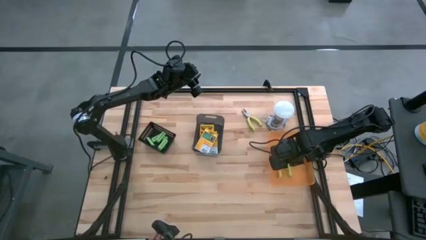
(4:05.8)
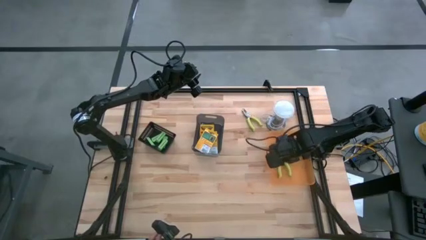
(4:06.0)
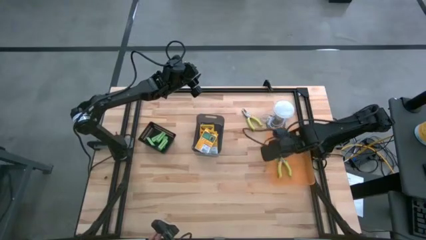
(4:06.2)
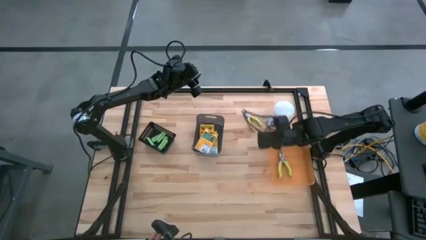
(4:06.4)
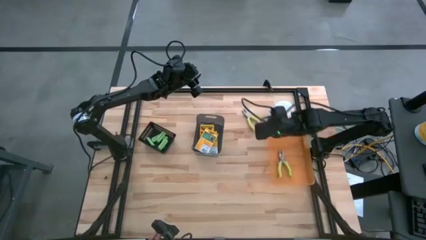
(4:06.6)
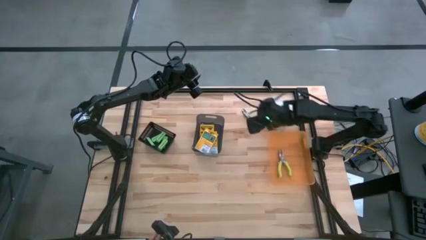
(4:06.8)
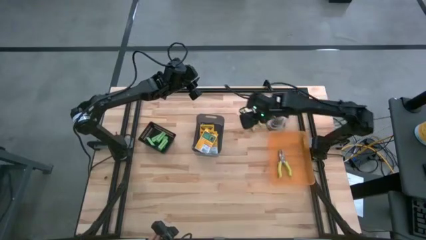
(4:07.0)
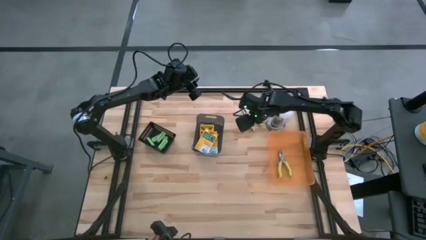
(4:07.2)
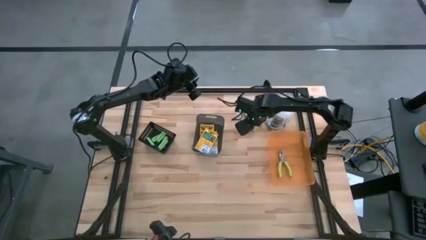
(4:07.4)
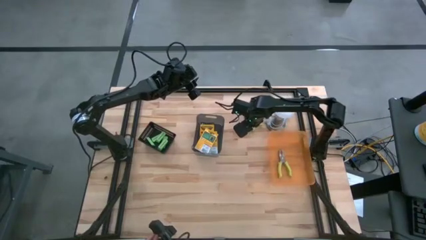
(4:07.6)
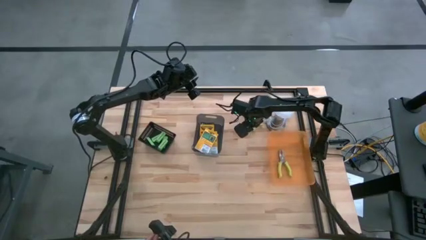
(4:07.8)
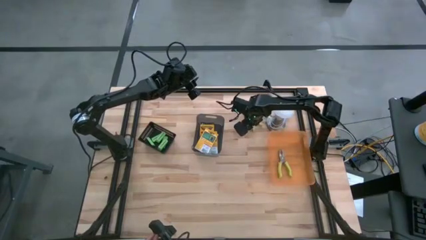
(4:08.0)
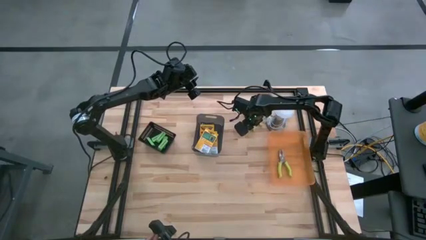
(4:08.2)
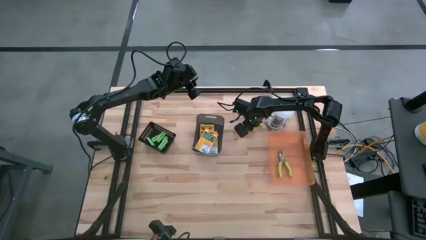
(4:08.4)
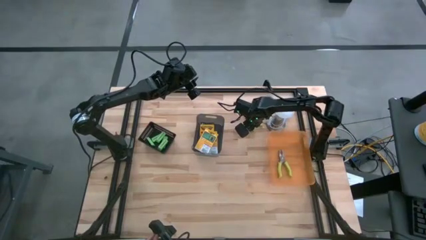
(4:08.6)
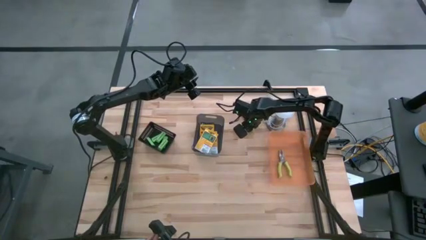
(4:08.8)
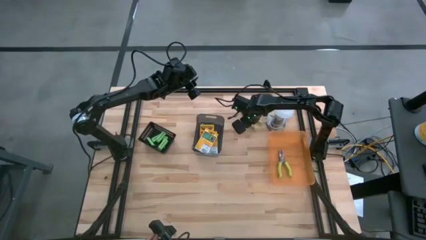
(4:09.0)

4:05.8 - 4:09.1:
Task: Pick & Place School Supplies
Put the light green hole puncher into the orange bin

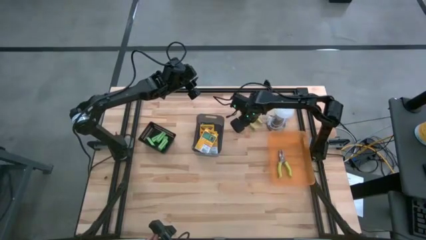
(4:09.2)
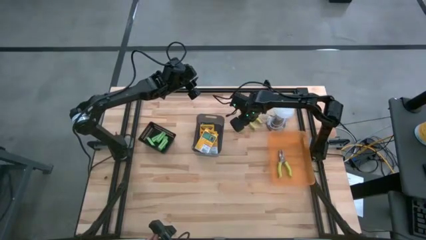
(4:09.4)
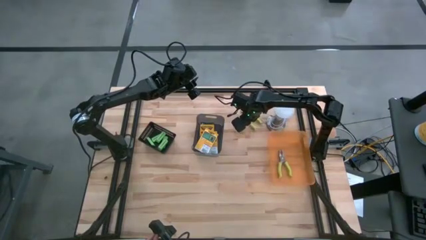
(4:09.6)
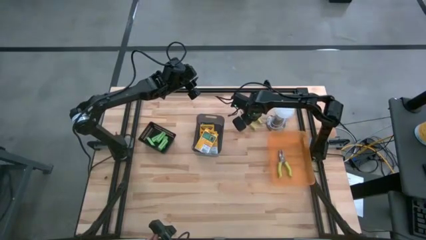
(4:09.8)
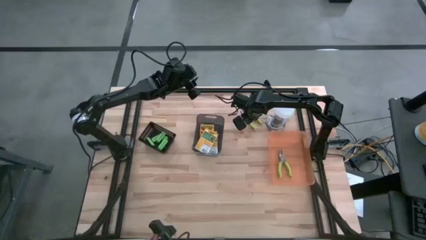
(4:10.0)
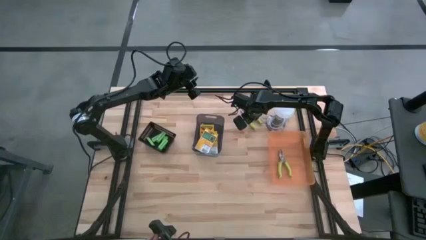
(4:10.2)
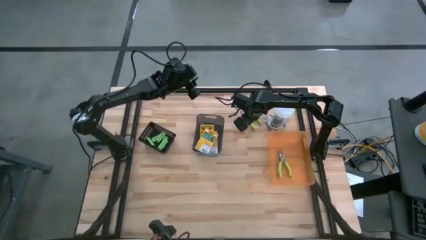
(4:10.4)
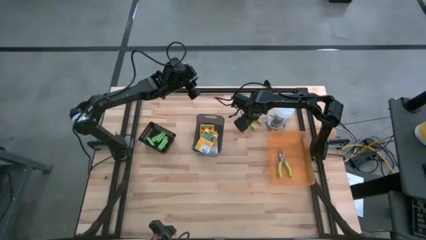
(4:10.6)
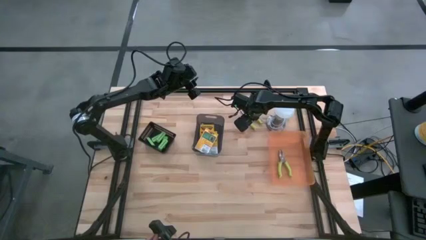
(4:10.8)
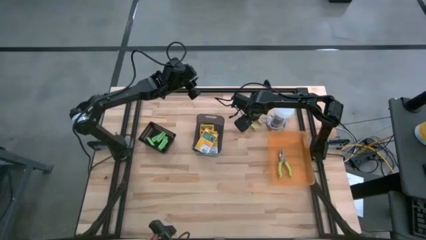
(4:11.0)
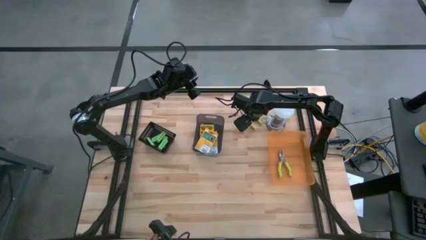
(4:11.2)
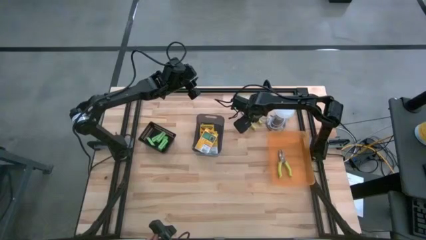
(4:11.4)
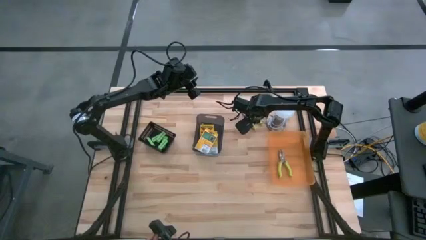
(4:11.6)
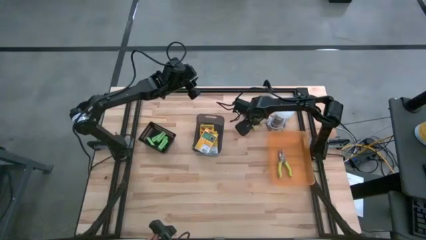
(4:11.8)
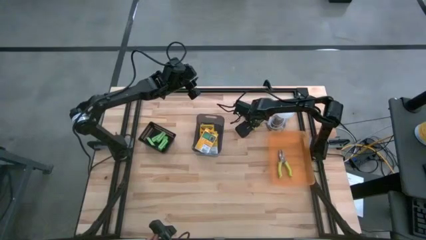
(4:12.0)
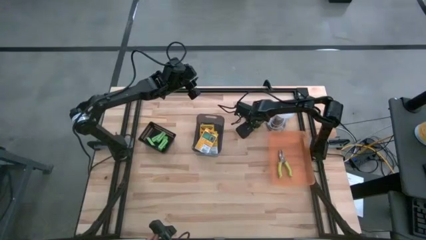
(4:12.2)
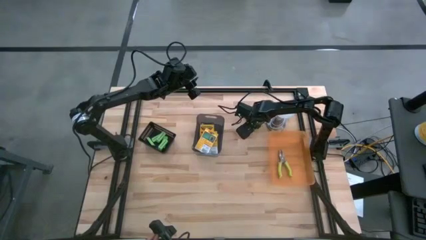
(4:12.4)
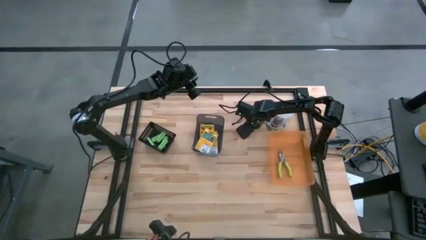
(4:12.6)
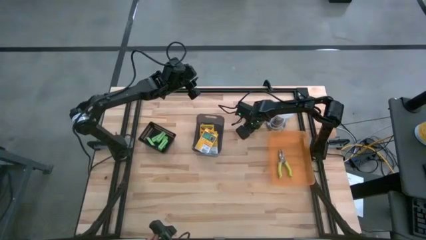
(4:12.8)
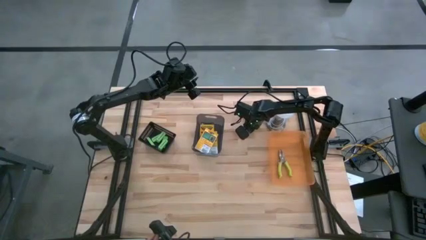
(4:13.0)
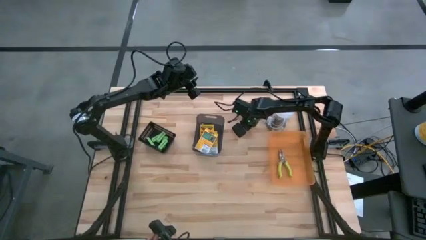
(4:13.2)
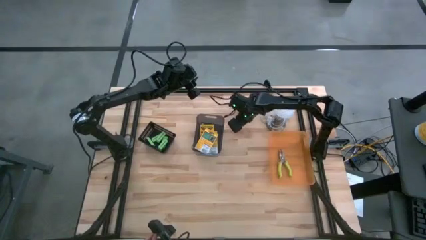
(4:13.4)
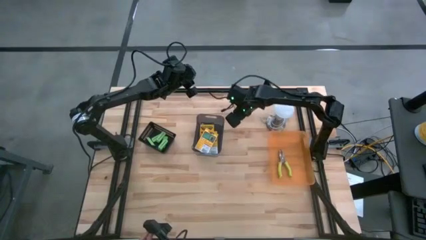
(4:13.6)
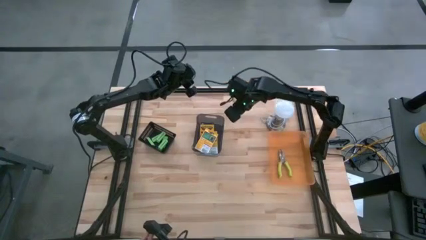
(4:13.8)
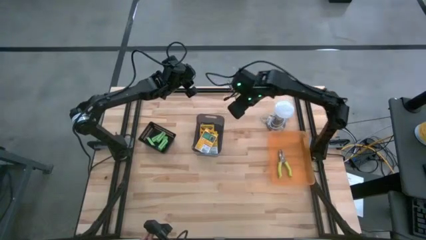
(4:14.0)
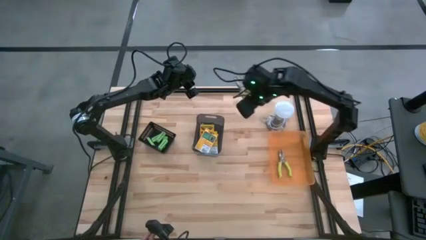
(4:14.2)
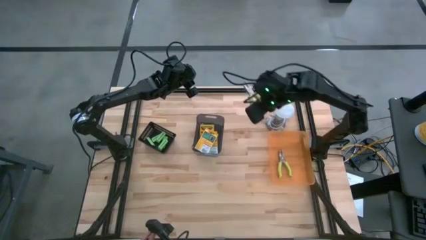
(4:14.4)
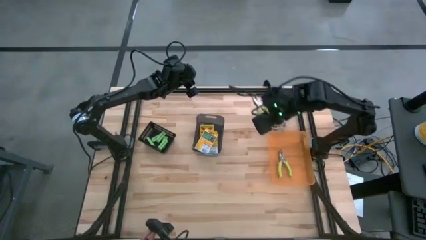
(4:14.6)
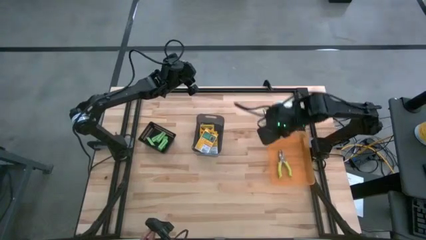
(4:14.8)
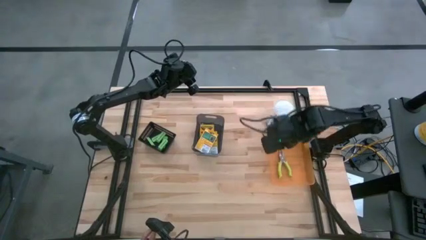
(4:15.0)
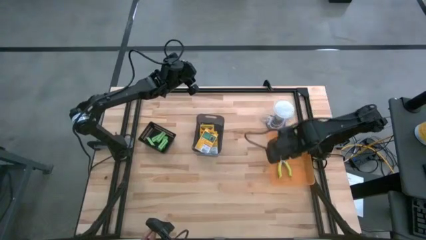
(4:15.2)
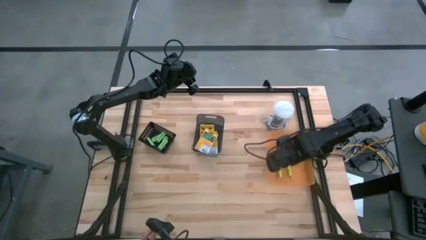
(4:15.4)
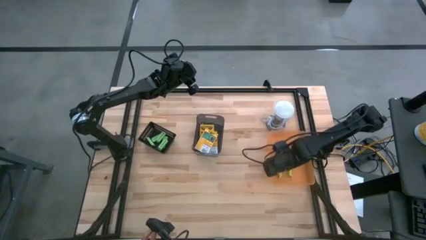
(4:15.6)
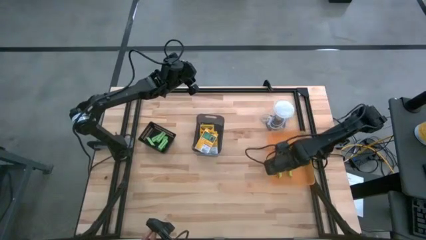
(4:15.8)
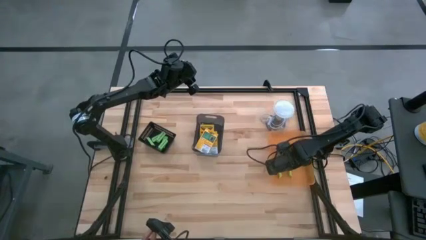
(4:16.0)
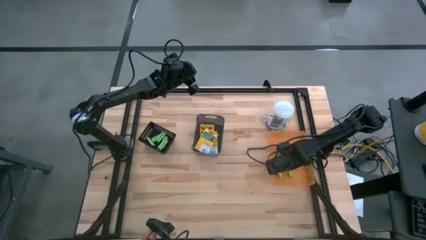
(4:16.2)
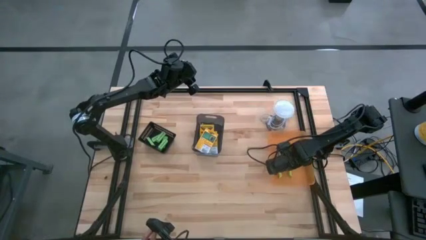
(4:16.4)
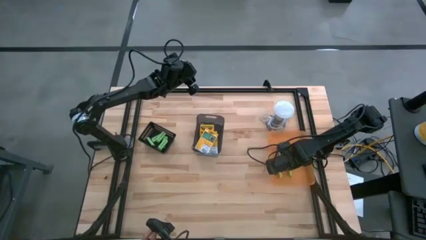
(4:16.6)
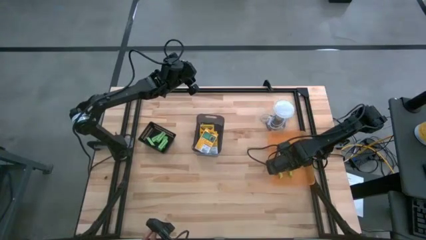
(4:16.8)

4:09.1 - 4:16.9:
Put the light green hole puncher into the orange bin

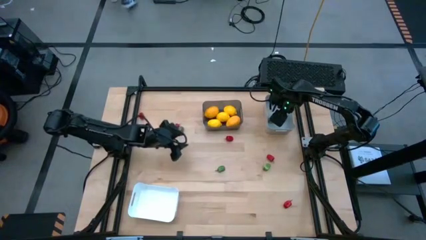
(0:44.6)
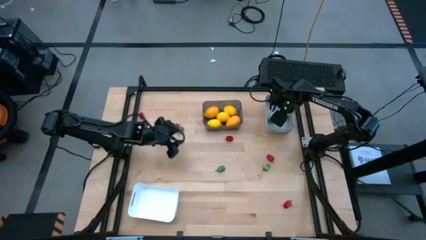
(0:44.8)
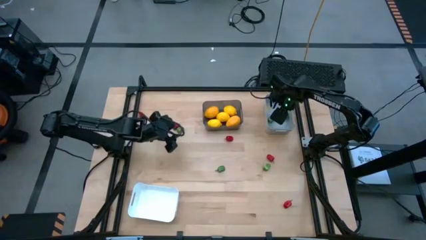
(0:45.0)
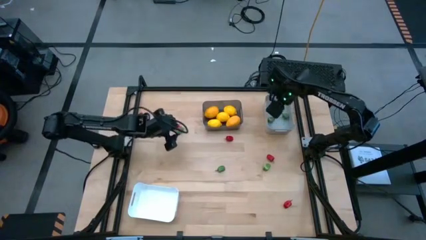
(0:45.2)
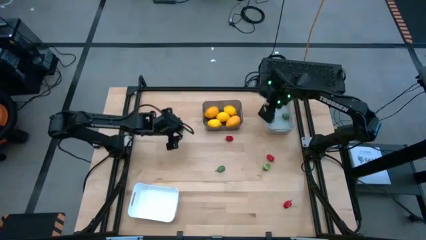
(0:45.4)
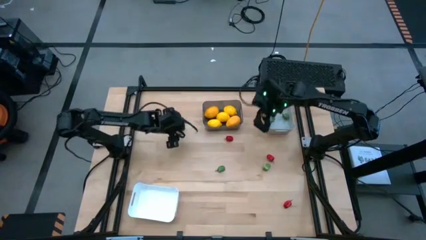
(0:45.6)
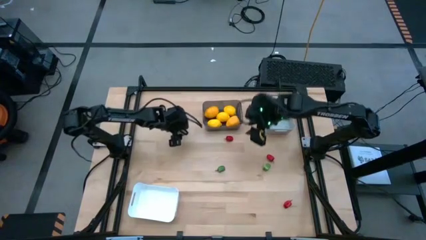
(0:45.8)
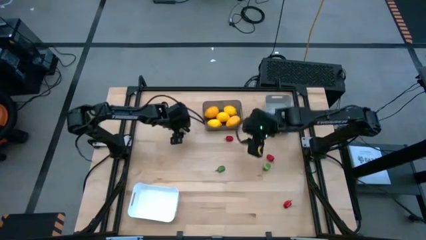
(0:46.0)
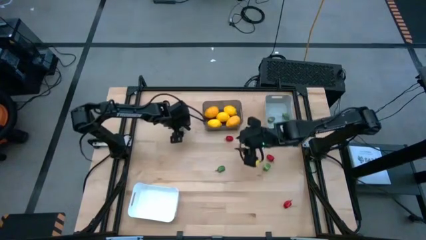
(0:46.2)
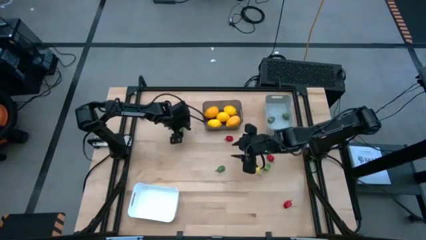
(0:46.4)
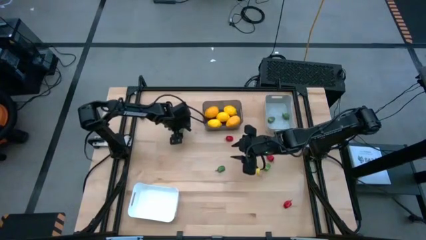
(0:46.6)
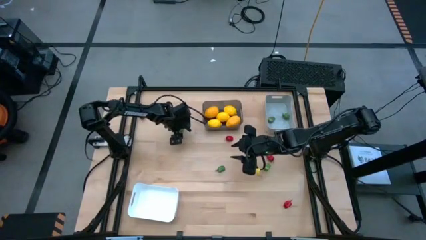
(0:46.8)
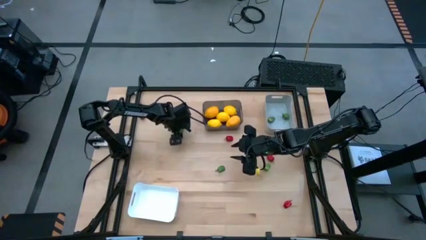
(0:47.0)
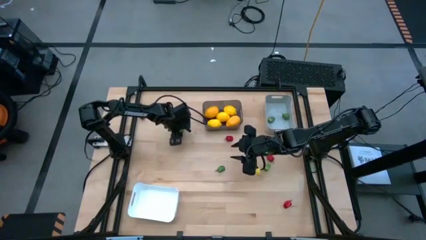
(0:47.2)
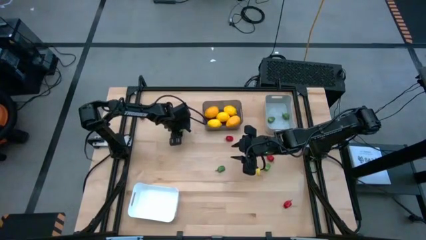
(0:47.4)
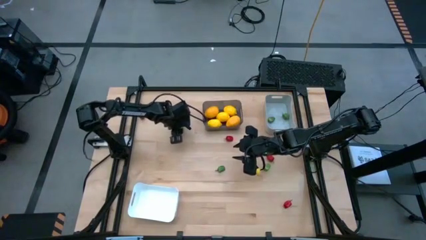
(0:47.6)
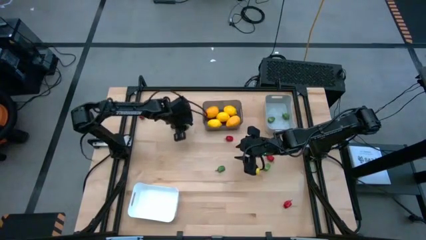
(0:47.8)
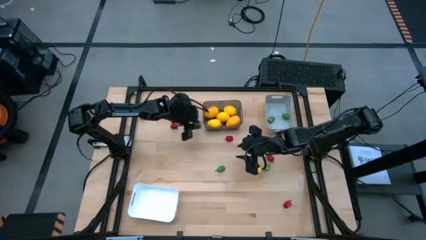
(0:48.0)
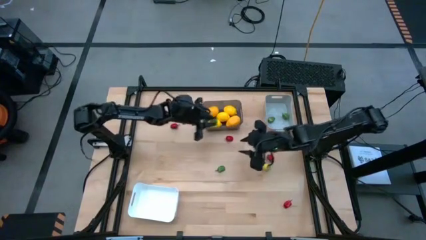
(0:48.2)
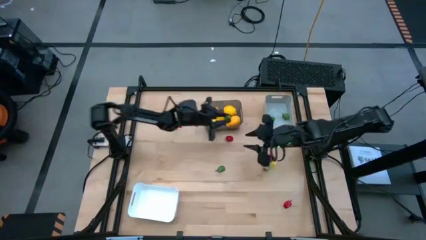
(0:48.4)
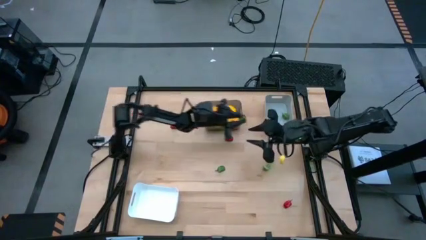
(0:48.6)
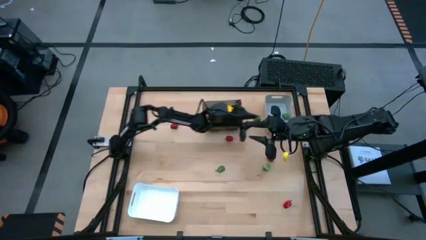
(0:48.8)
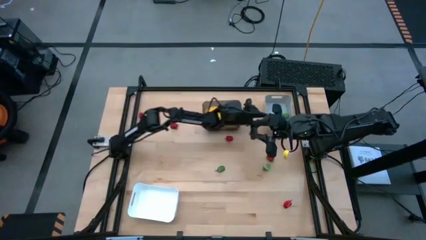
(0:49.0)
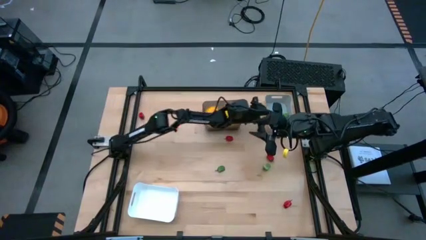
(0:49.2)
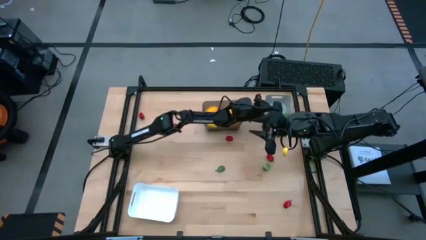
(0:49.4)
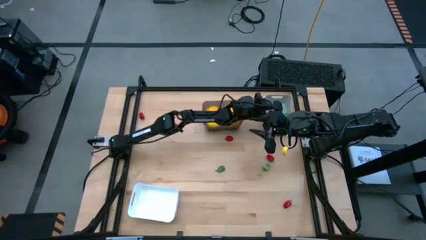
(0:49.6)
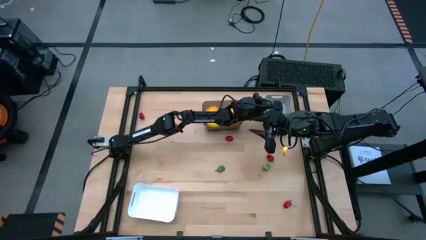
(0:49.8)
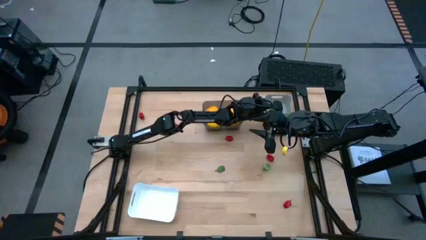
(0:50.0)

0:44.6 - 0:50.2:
Task: Sort produce into baskets
Put the green pepper into the gray bin
